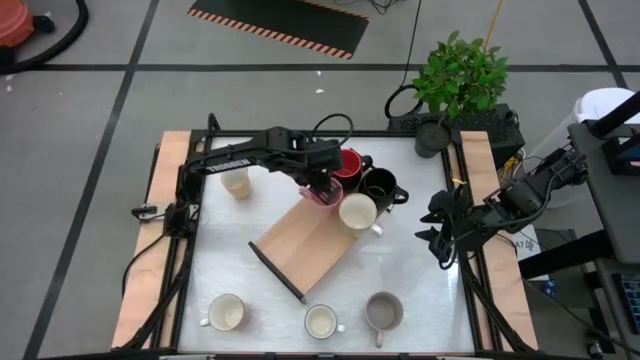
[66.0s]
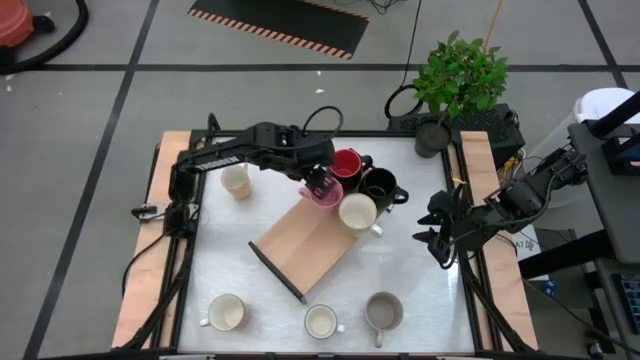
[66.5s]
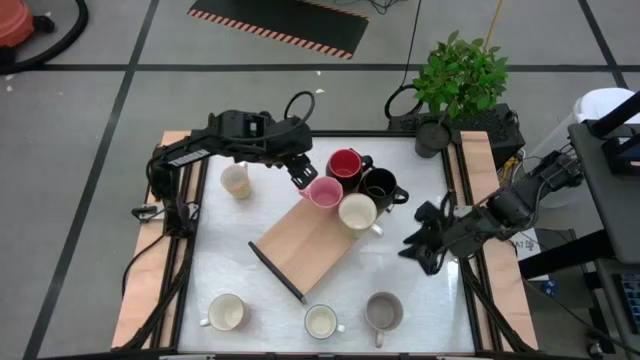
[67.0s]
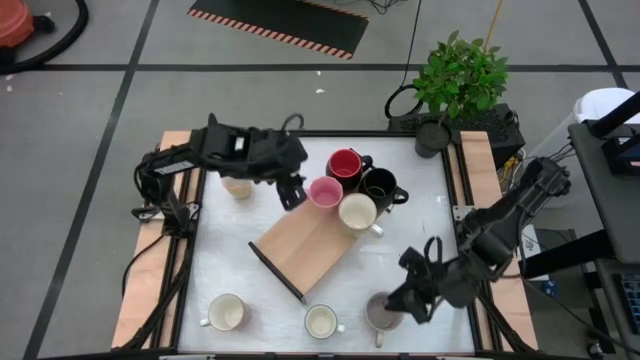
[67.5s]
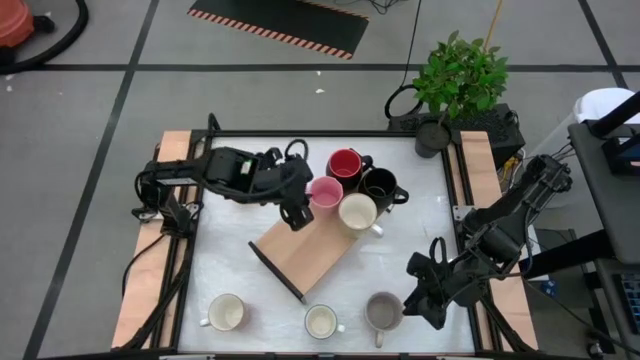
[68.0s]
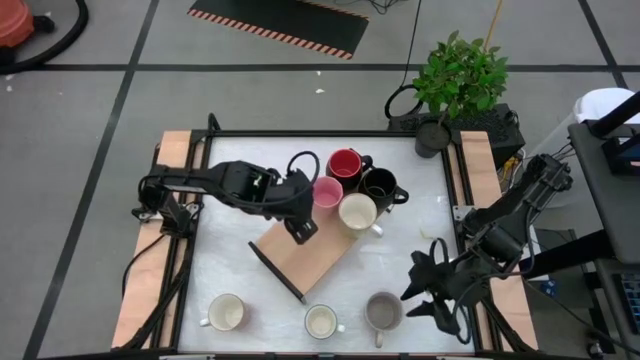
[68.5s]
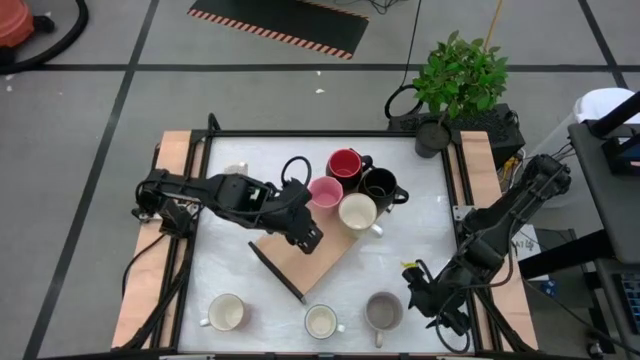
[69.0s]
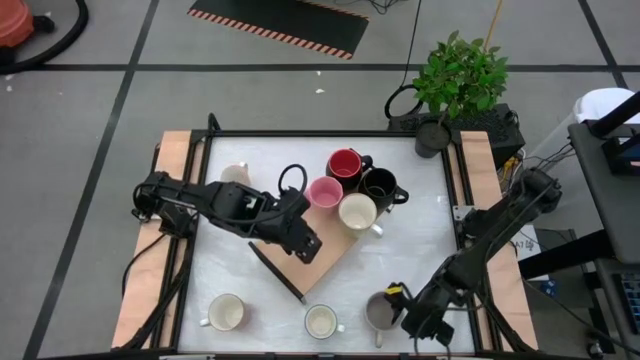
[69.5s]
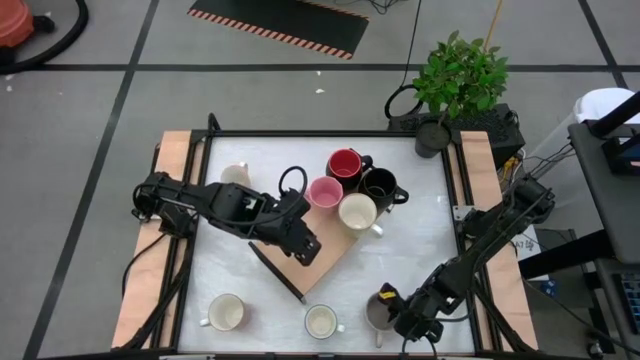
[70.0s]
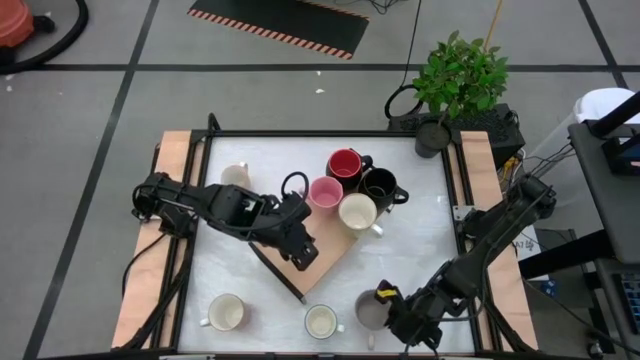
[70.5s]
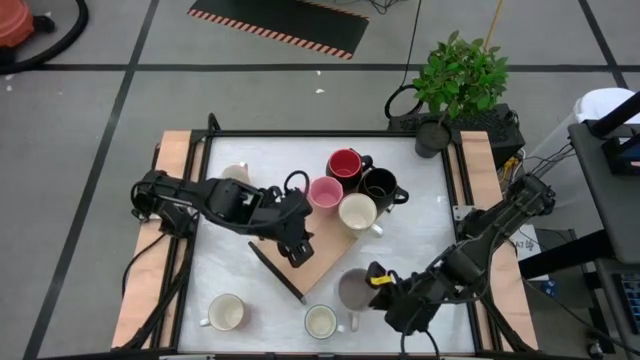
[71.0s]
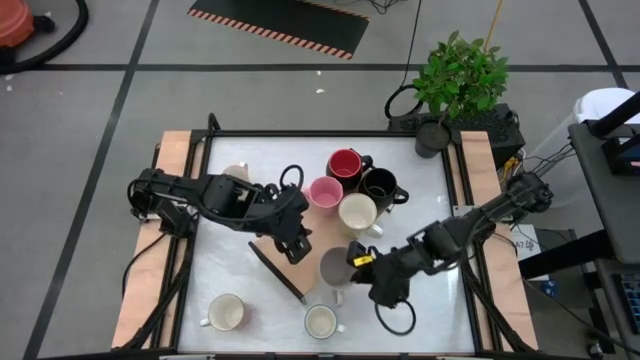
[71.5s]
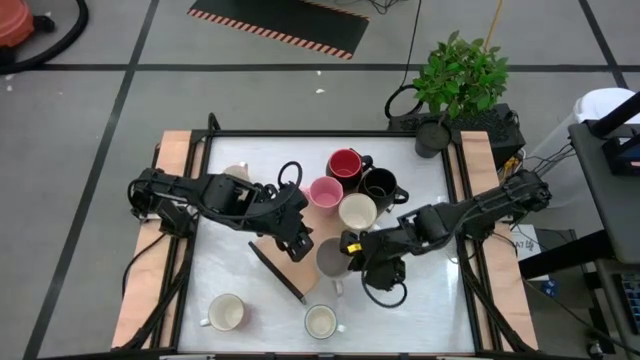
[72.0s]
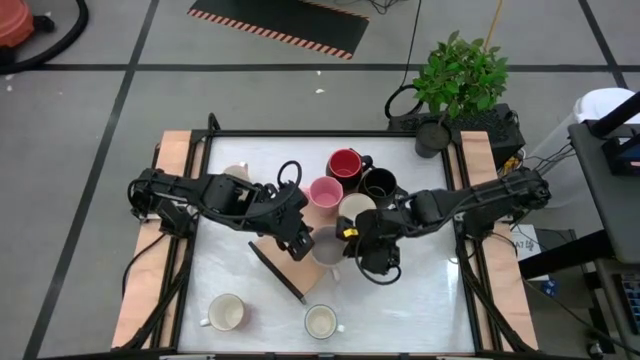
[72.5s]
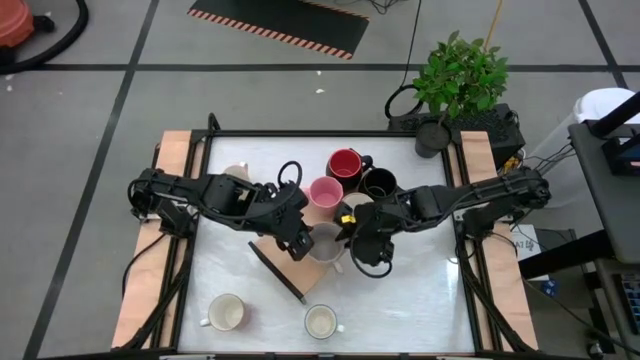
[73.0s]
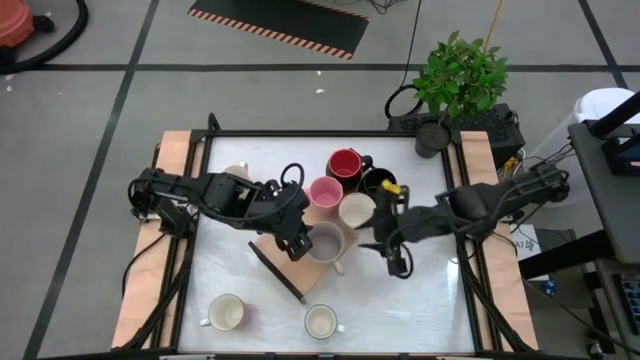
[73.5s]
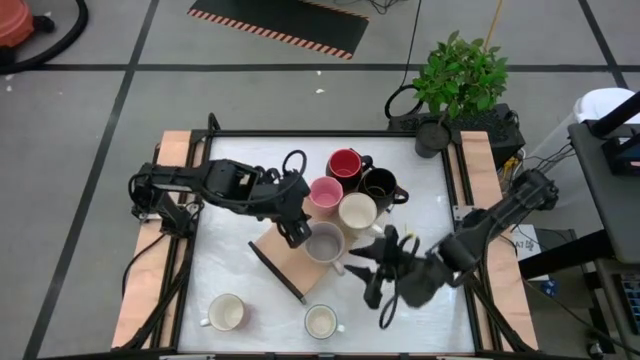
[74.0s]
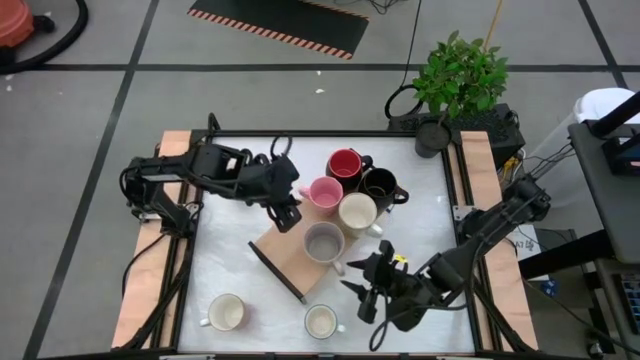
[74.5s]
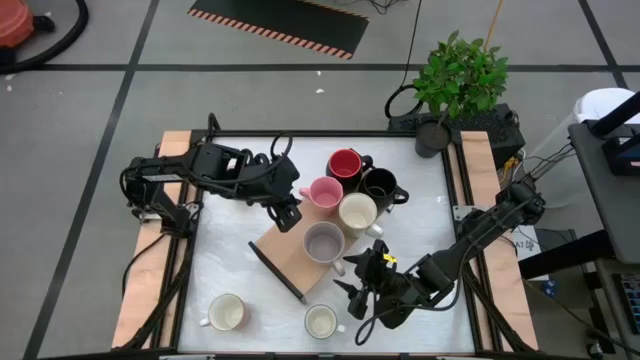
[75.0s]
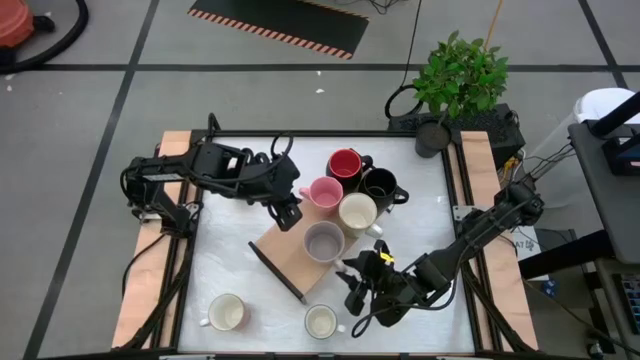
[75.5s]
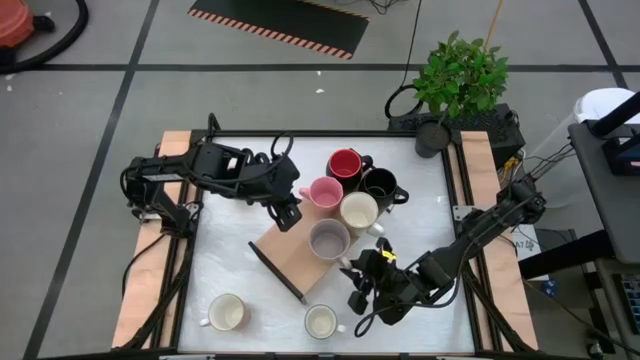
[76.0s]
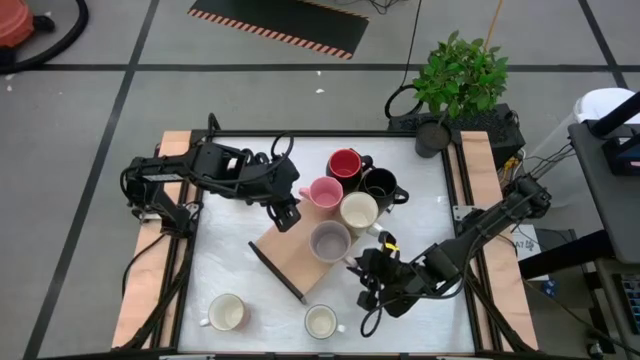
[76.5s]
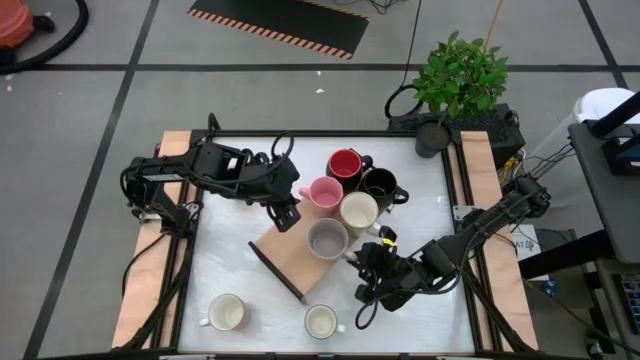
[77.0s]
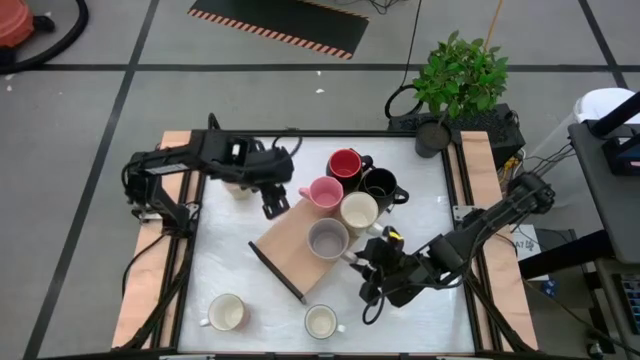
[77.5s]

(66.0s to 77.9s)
Task: Place coffee mugs
Put the gray mug on top of the shelf

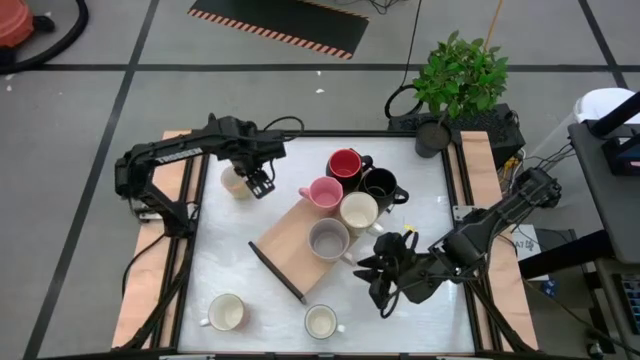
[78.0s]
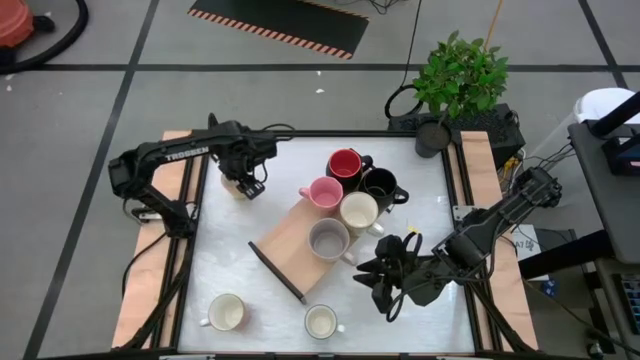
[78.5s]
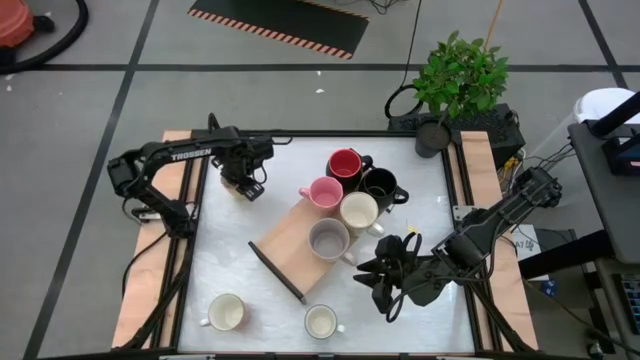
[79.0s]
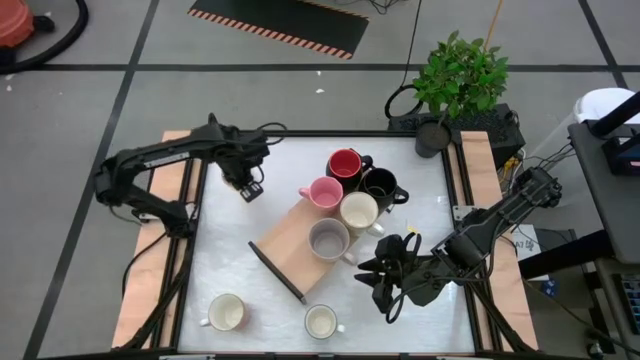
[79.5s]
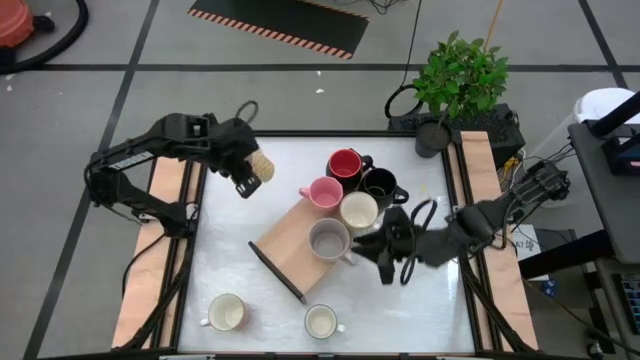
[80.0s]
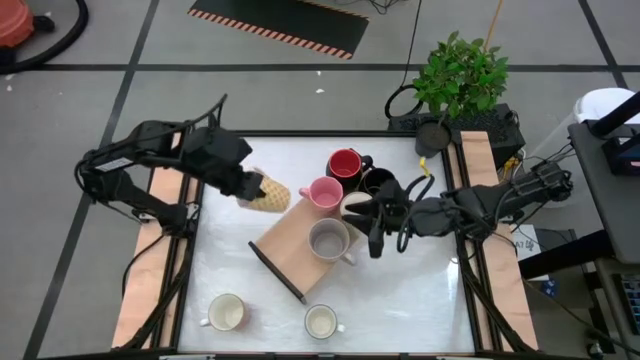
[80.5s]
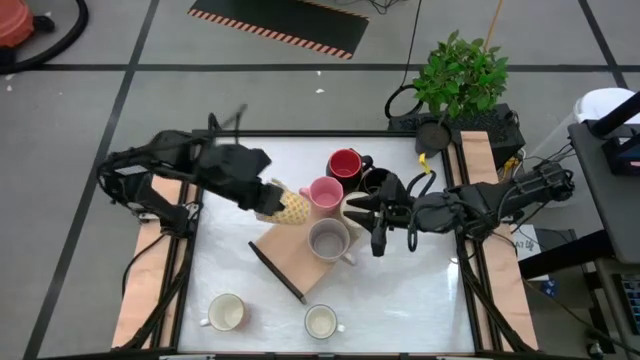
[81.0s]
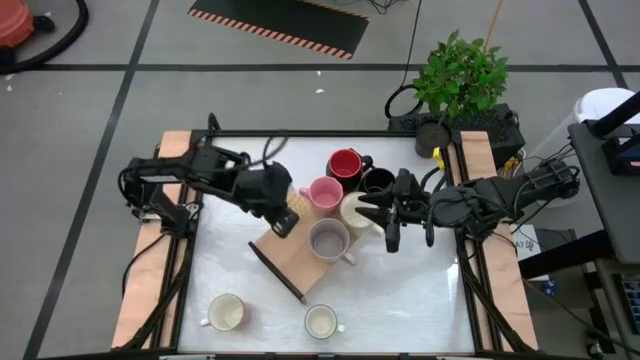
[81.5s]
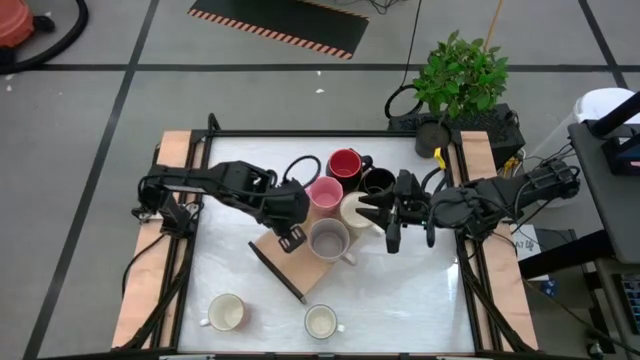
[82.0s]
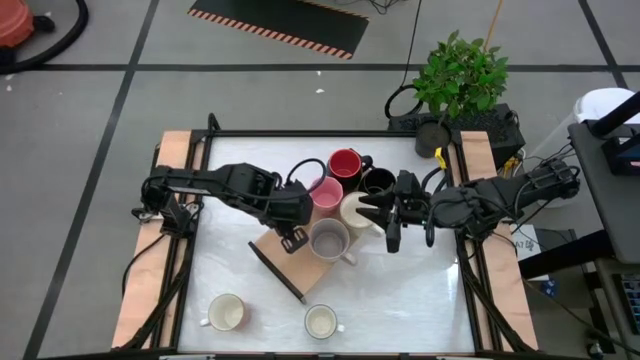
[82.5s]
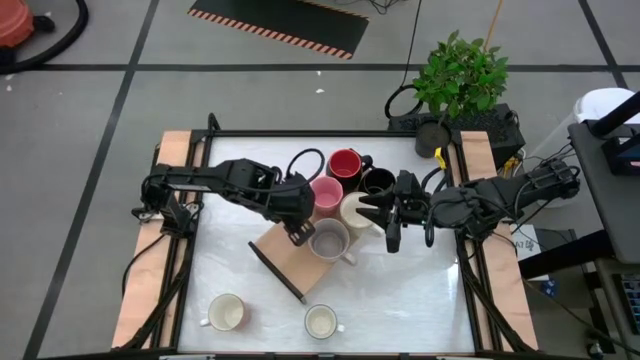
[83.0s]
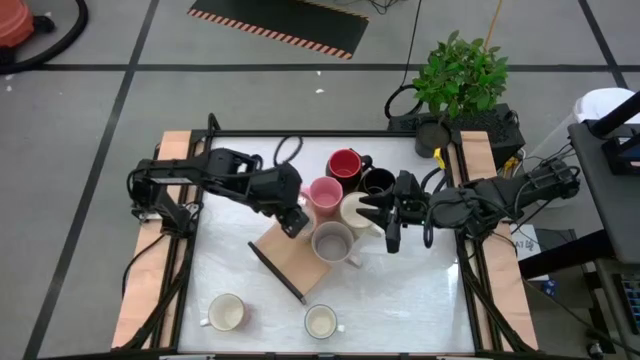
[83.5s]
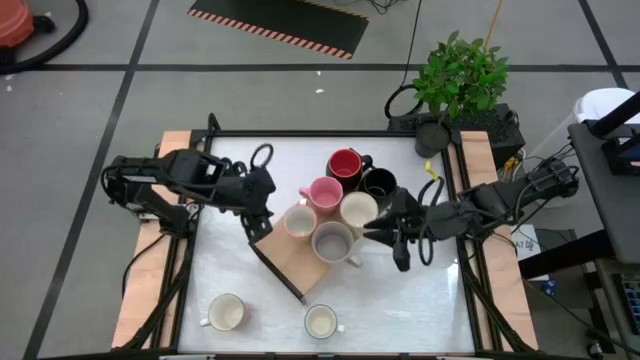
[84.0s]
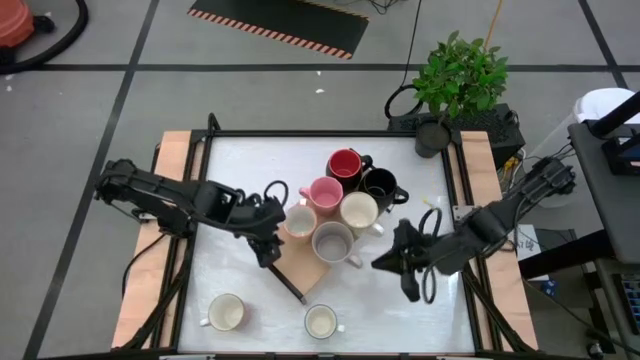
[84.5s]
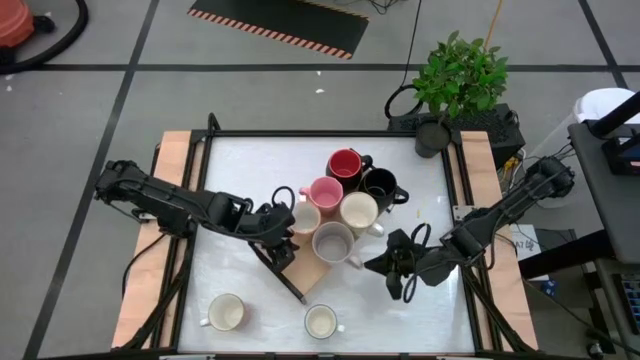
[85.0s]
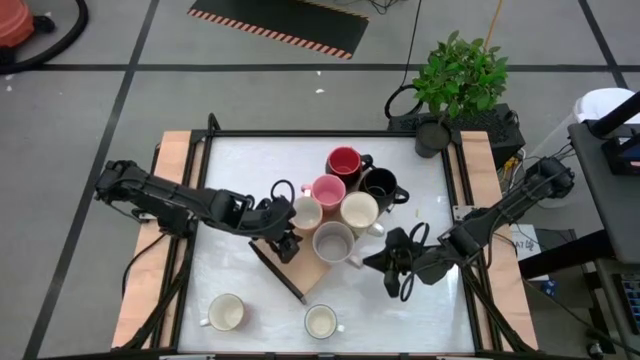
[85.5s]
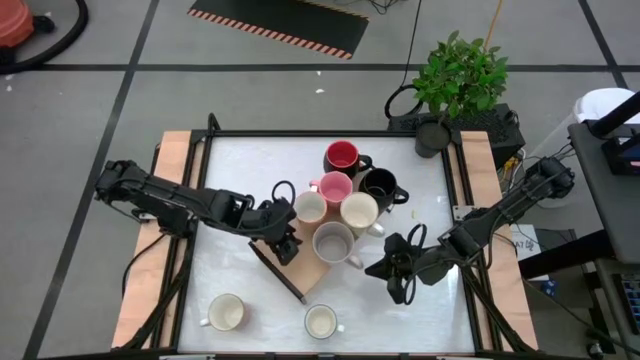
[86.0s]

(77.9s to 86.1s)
Put the orange mug on top of the shelf

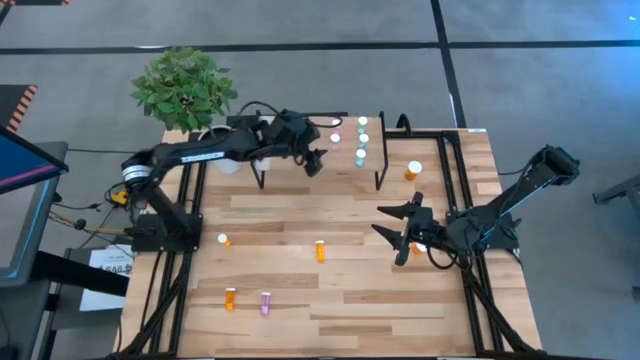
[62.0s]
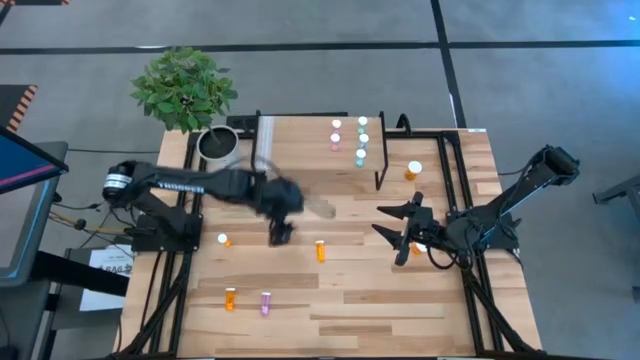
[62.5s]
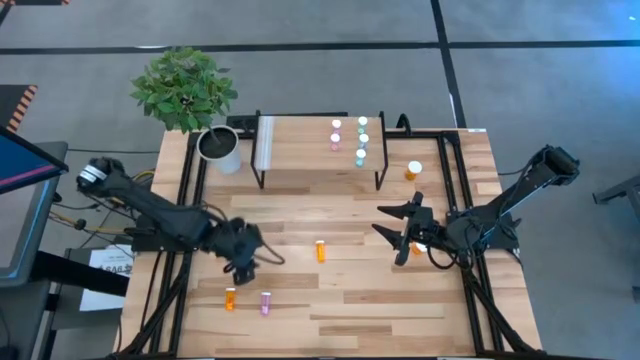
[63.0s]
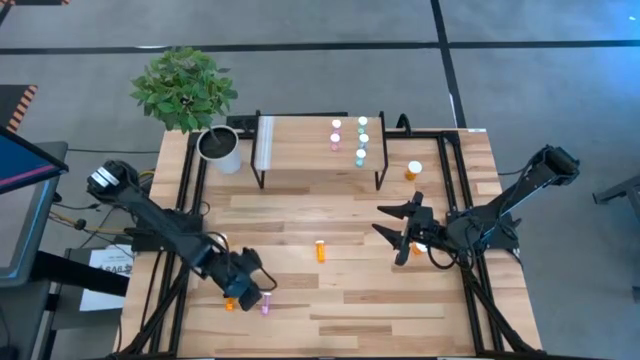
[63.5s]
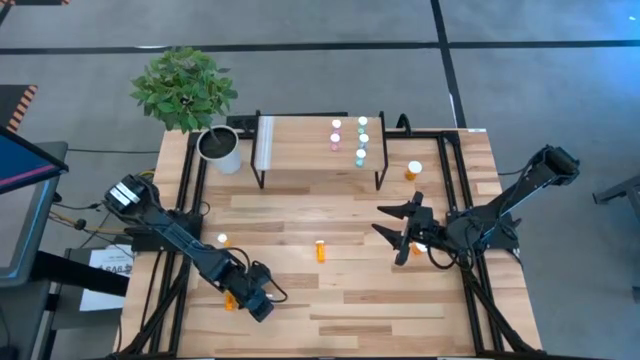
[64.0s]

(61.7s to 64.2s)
Task: Pick and place medicine bottles onto shelf by color
Put the pink pill bottle on the shelf aligned with the other pink pill bottles
